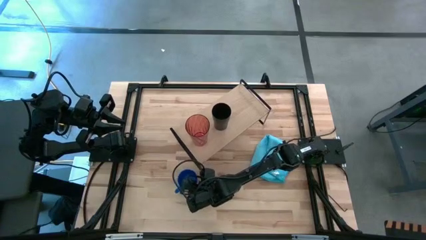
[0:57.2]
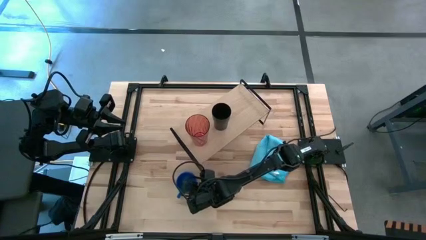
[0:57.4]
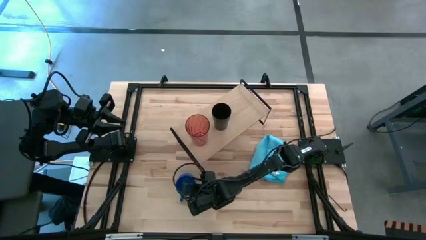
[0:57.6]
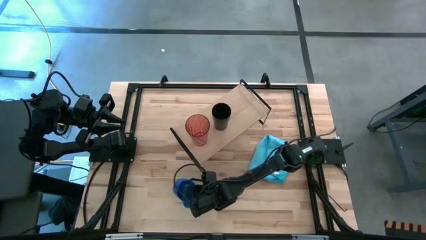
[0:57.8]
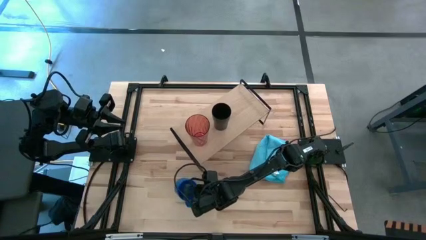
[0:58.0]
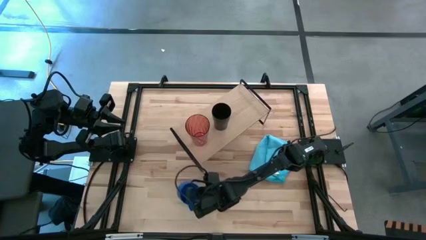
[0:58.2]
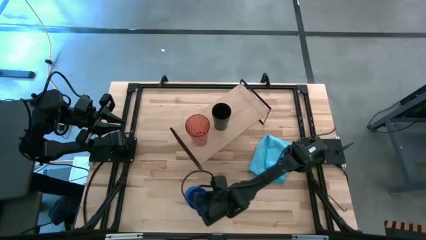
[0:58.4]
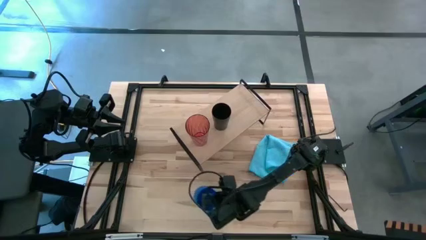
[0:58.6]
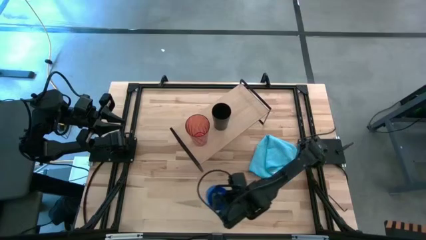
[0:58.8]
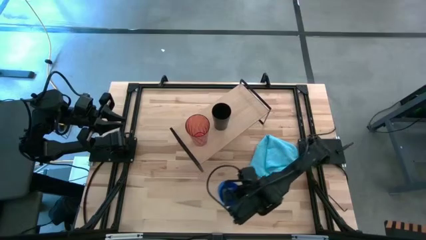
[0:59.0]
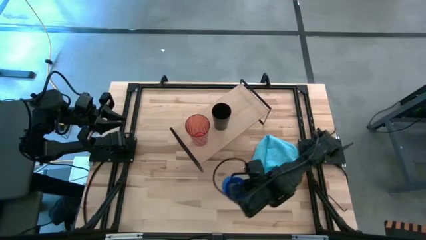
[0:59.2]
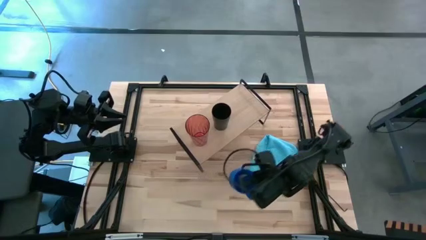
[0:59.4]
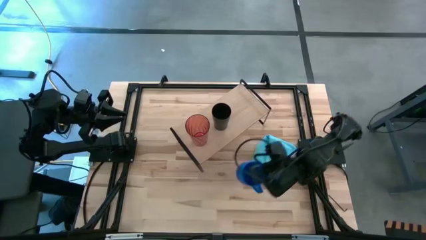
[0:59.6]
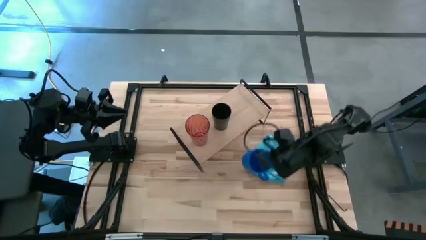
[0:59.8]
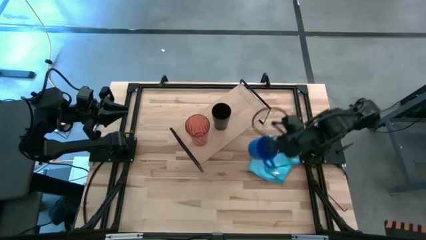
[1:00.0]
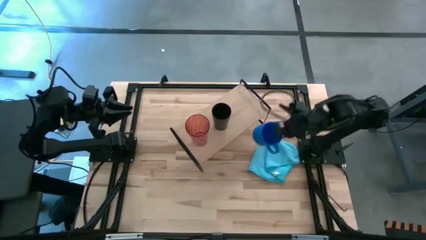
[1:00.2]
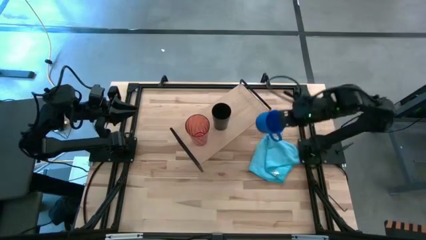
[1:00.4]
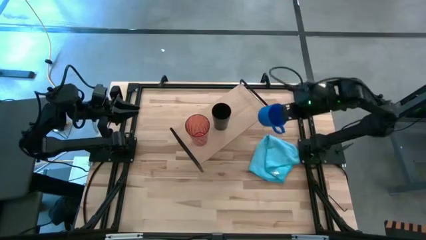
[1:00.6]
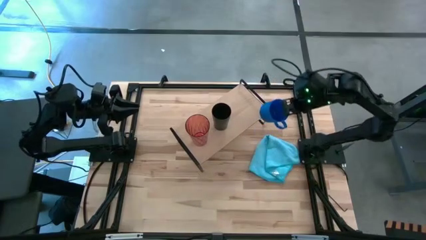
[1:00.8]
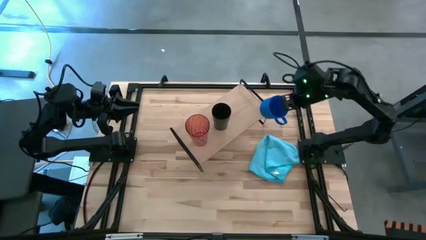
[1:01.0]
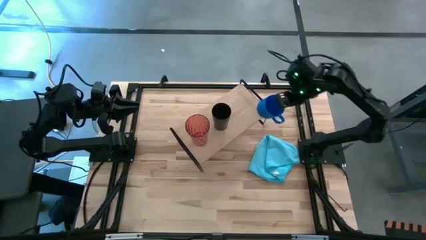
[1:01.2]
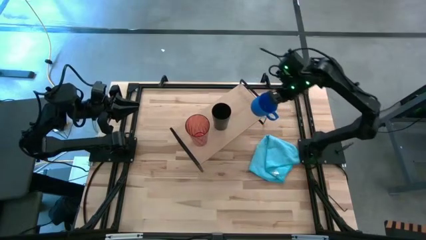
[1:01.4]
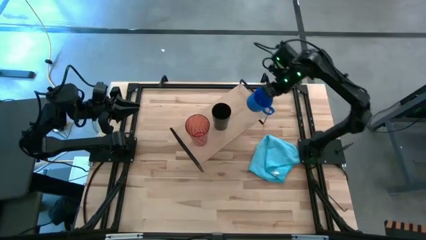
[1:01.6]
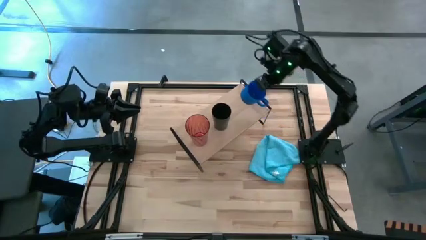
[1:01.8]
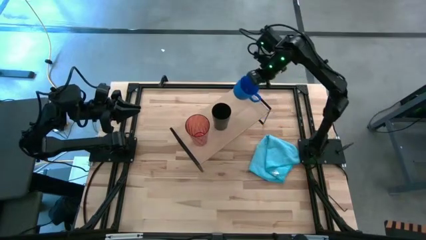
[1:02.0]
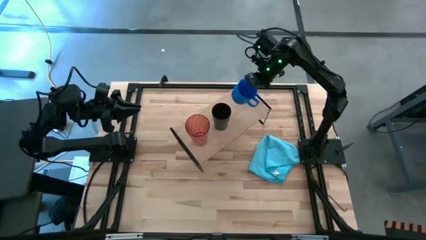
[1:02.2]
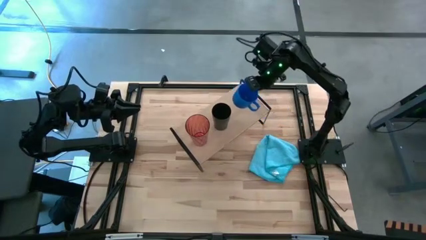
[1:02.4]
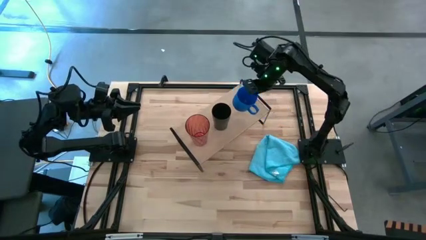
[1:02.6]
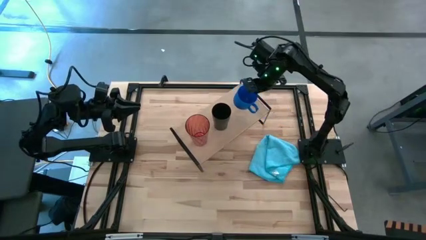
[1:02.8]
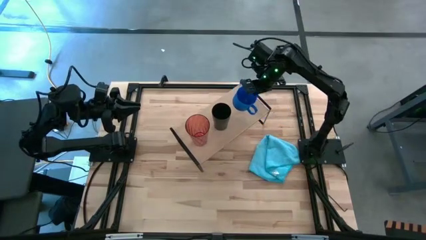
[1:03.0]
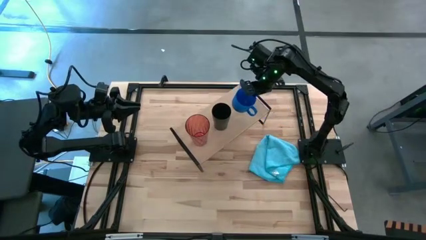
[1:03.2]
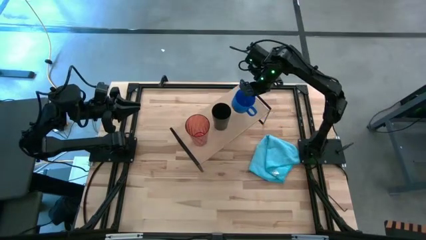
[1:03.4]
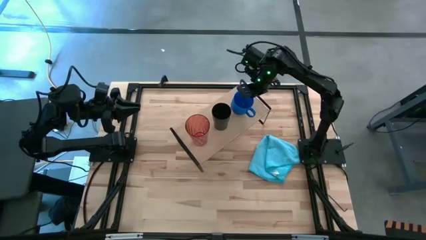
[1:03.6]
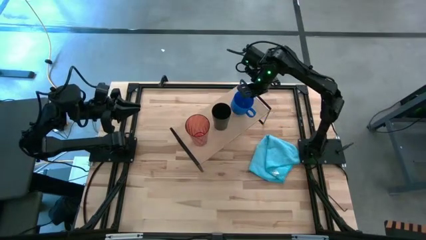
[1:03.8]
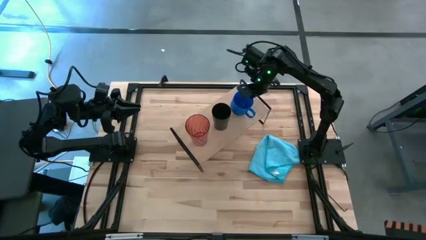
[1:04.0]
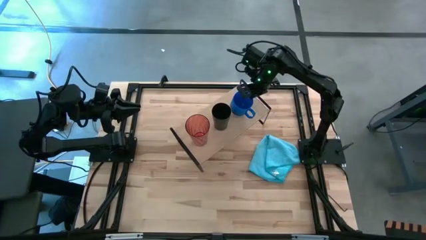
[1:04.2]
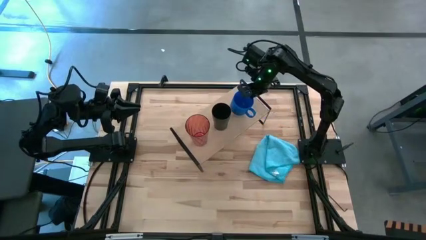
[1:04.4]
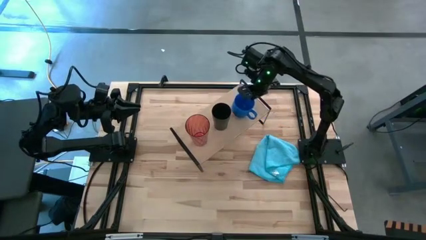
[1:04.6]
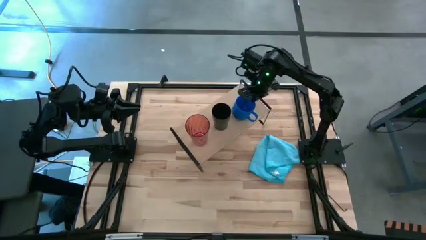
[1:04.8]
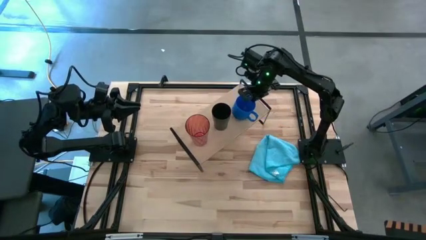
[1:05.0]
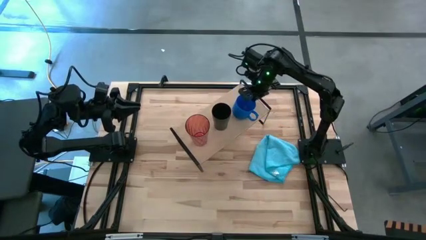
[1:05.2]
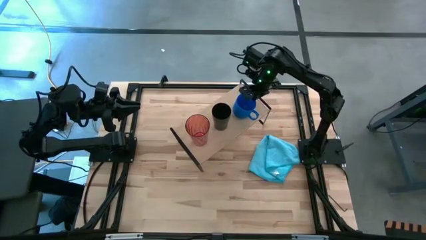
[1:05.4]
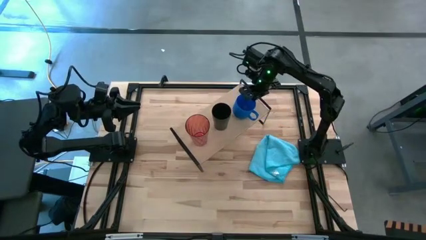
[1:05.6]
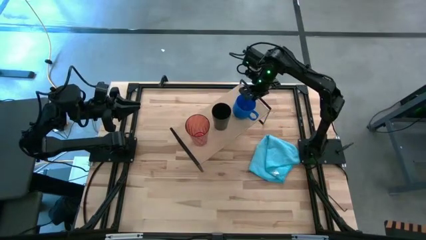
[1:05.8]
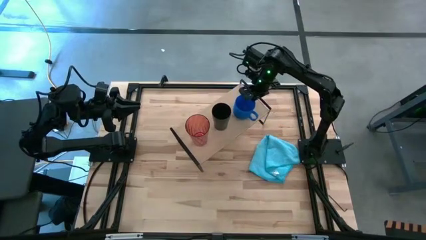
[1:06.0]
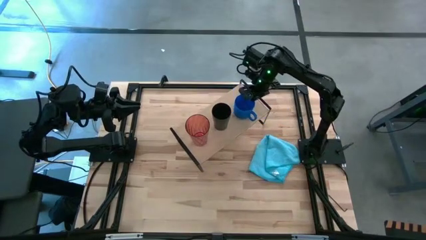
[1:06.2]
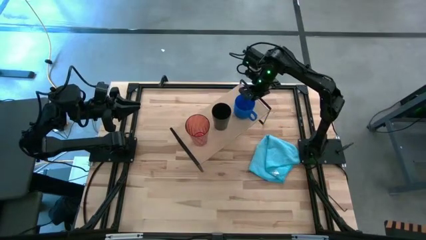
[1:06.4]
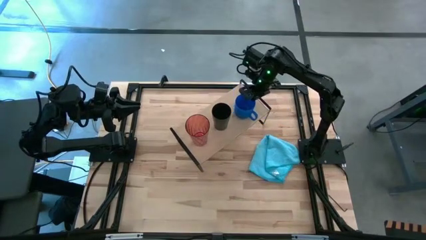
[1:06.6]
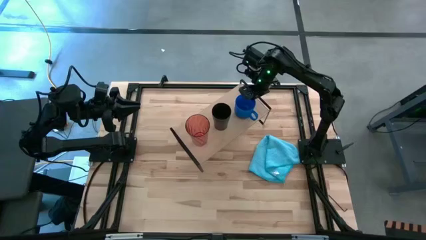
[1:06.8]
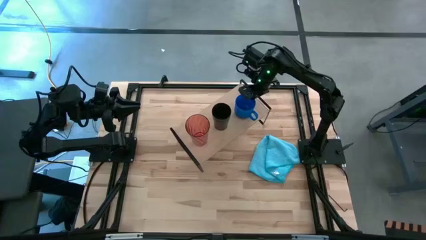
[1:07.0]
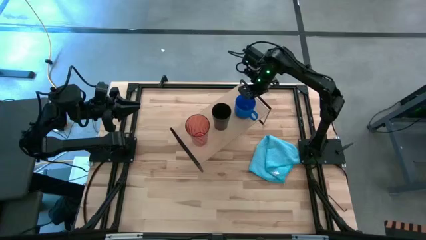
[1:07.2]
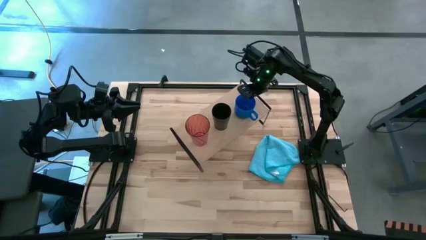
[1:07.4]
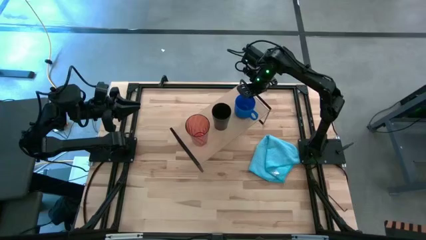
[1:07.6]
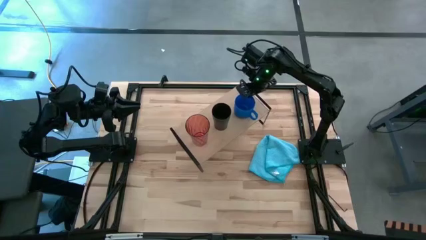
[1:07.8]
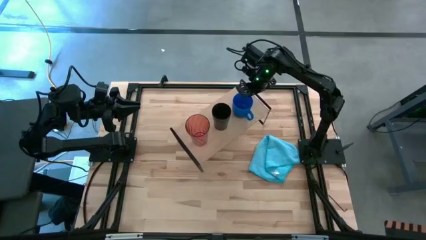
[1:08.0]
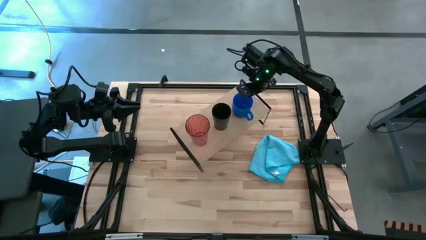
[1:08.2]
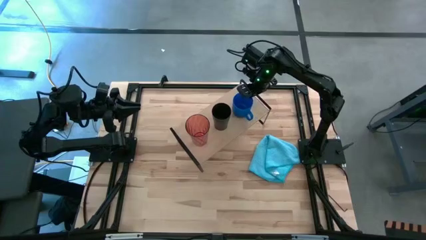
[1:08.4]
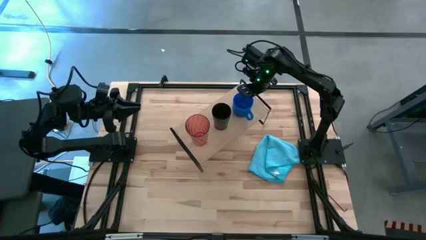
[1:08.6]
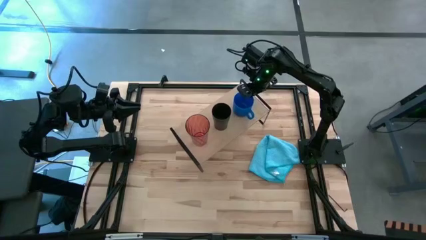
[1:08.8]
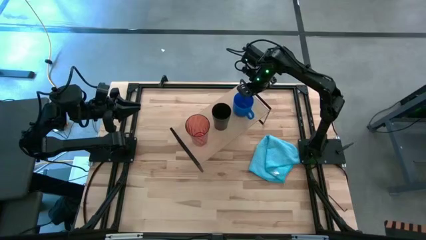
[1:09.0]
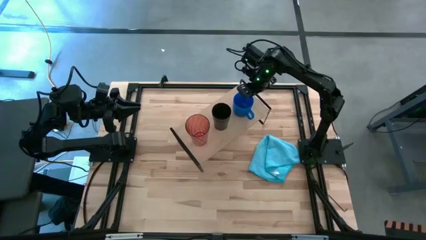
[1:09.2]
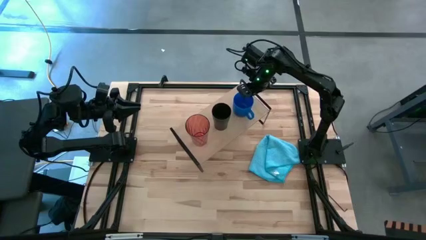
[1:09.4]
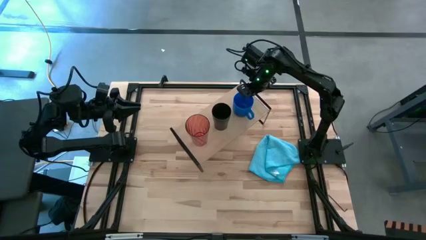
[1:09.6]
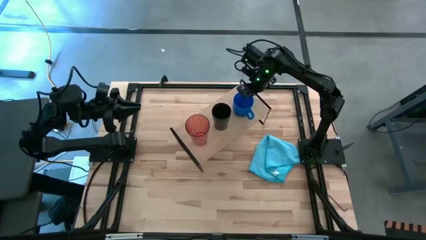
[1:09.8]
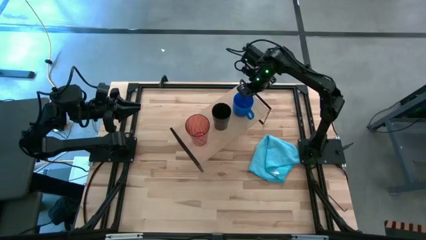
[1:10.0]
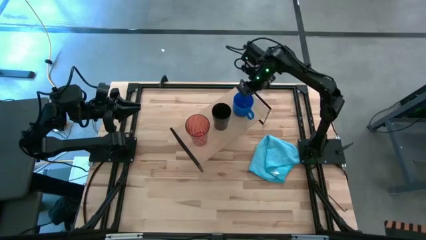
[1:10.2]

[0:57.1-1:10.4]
Task: Stack small to large cups/mugs on shelf
Put the blue mug on the shelf
